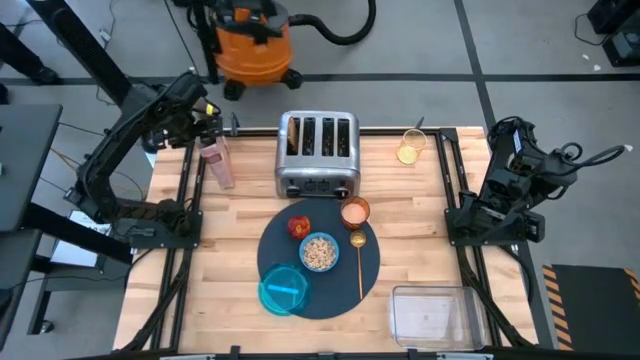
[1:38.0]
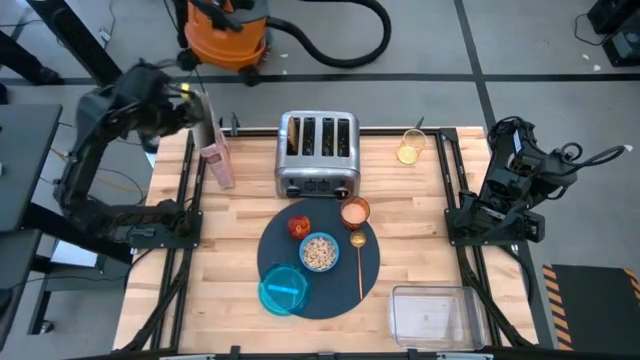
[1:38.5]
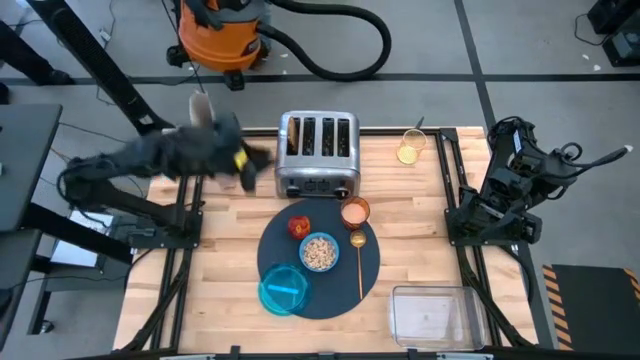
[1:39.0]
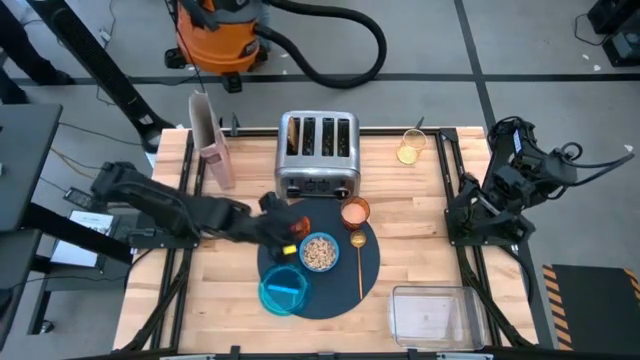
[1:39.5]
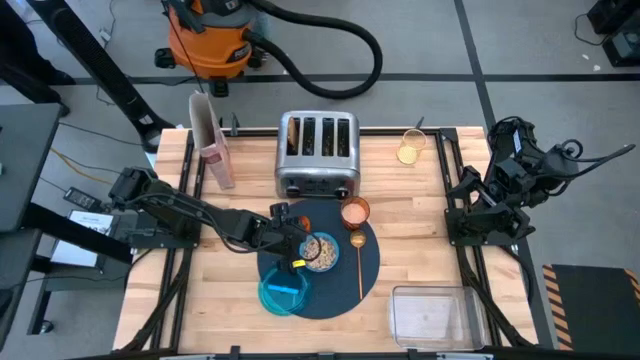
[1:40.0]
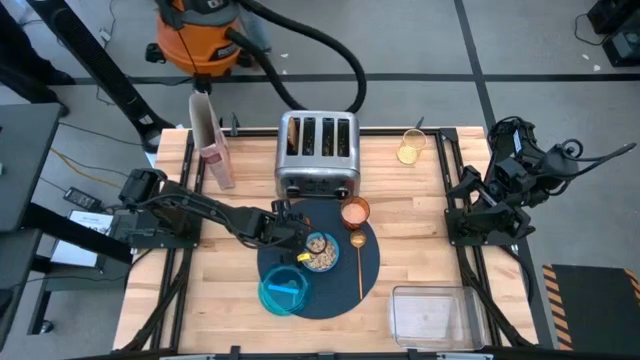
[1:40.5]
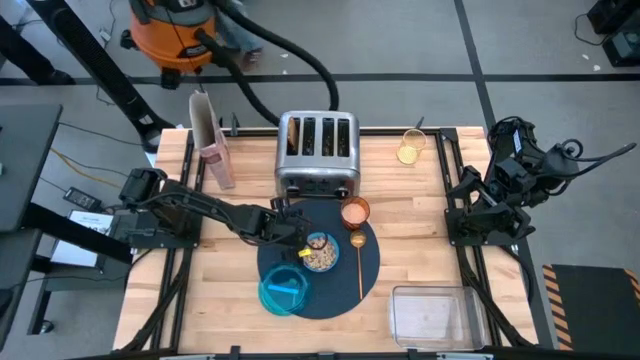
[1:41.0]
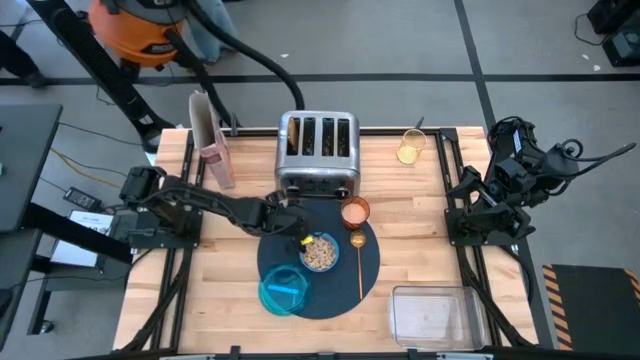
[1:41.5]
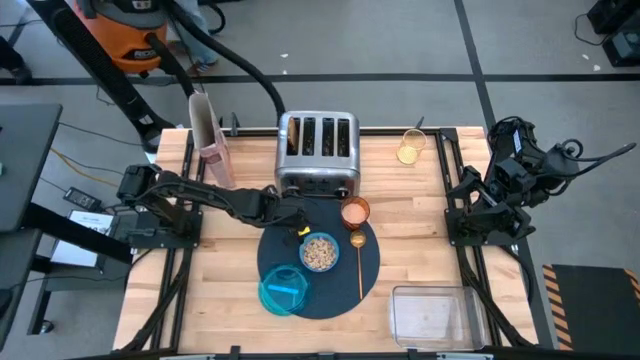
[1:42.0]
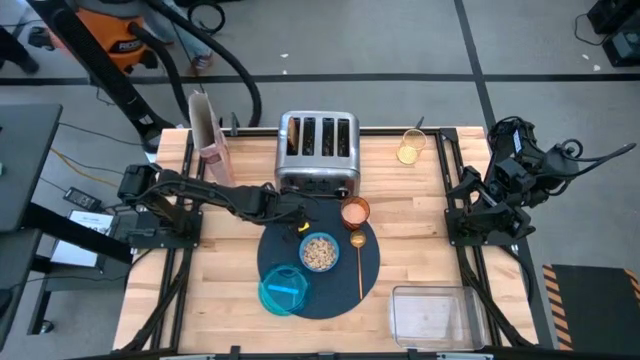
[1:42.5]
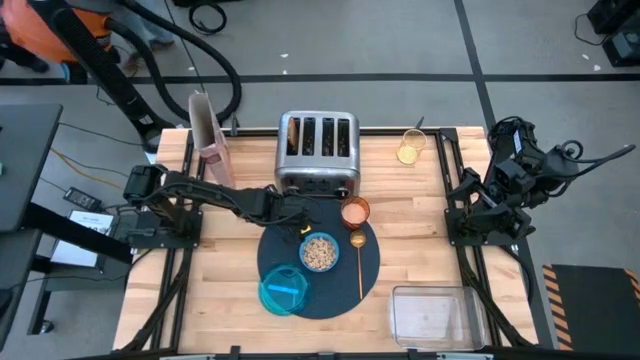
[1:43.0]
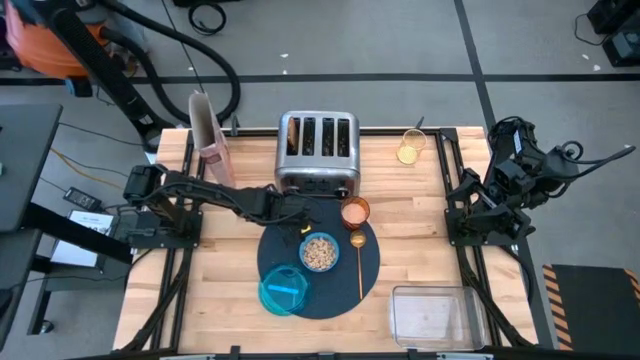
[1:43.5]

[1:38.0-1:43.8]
Task: Arrange a breakfast setting
Adjust the red apple

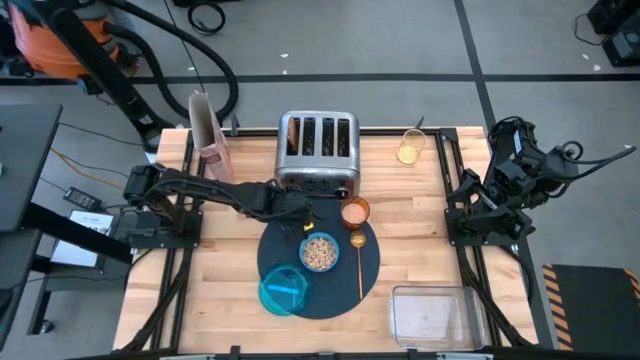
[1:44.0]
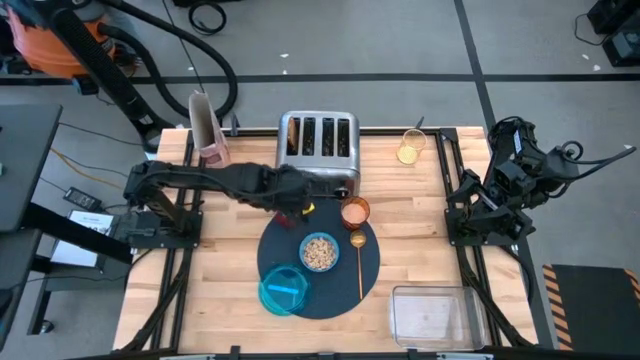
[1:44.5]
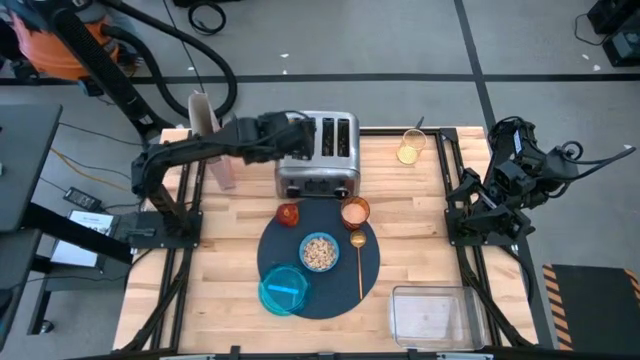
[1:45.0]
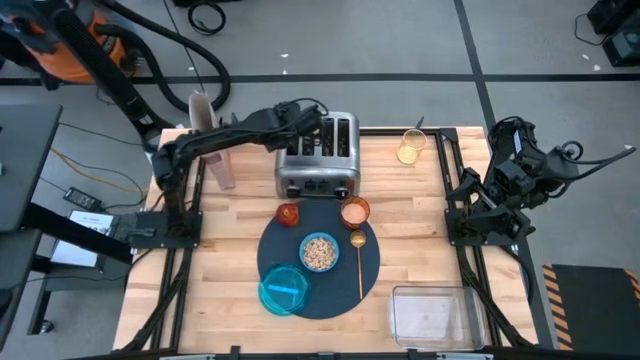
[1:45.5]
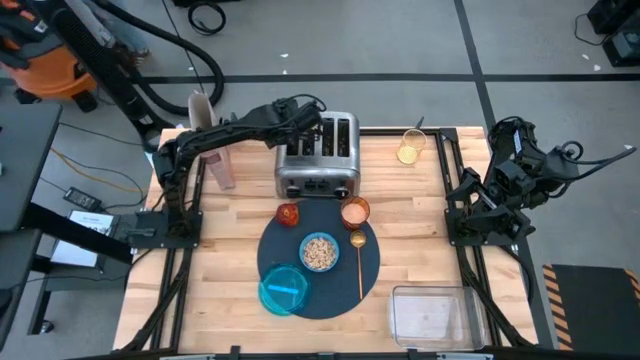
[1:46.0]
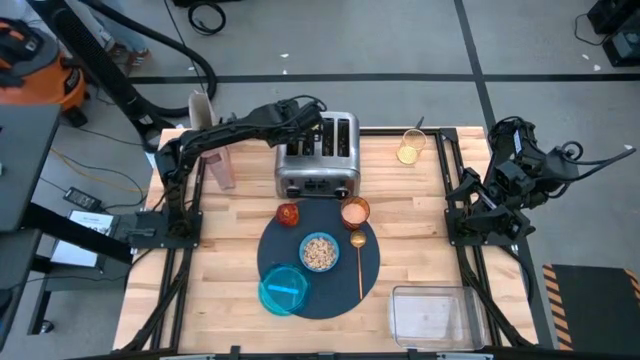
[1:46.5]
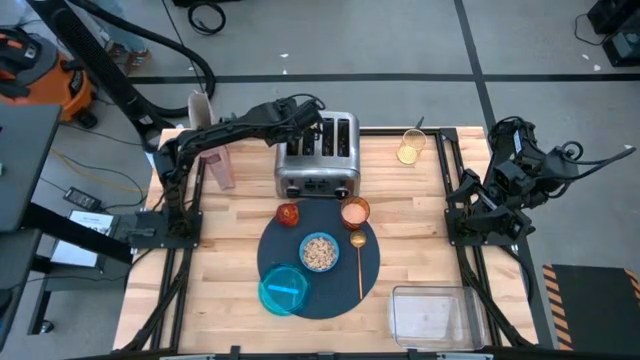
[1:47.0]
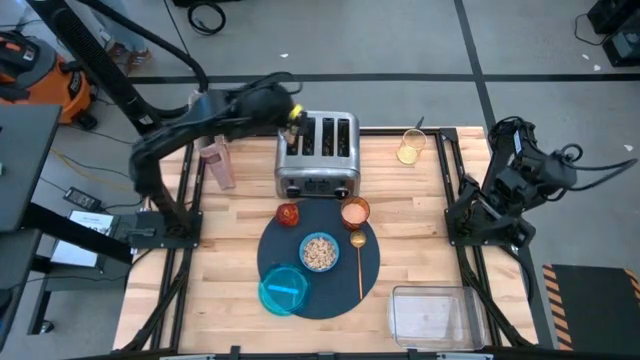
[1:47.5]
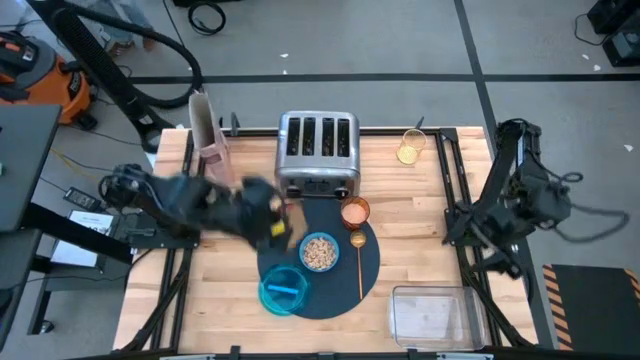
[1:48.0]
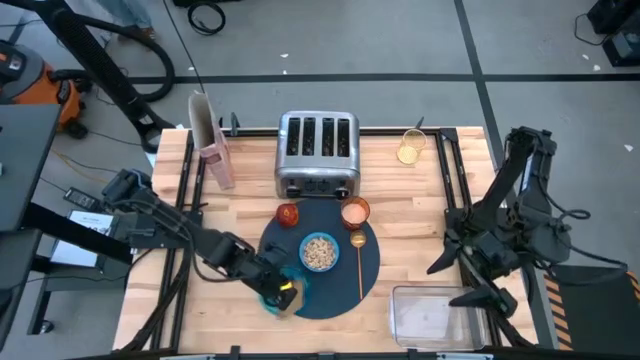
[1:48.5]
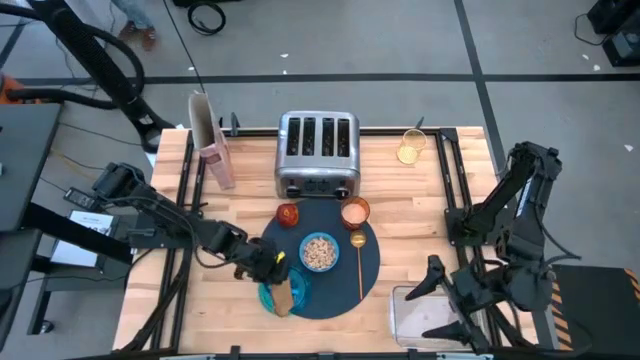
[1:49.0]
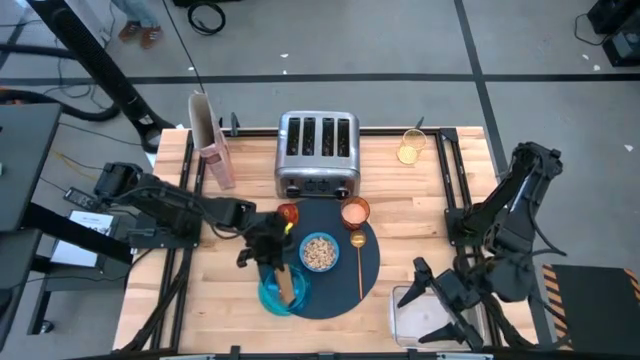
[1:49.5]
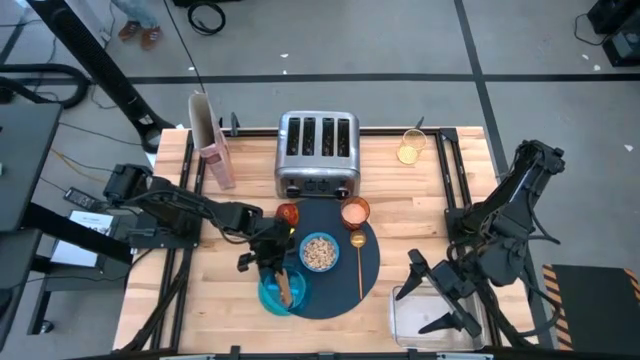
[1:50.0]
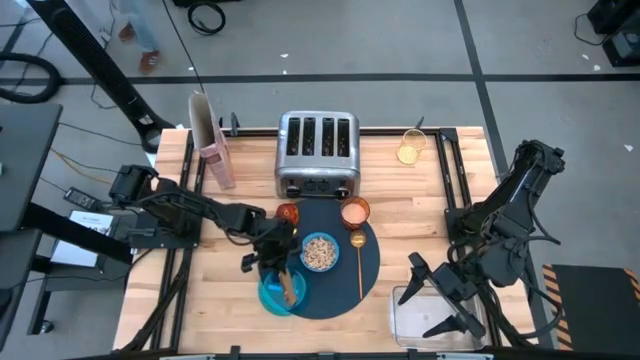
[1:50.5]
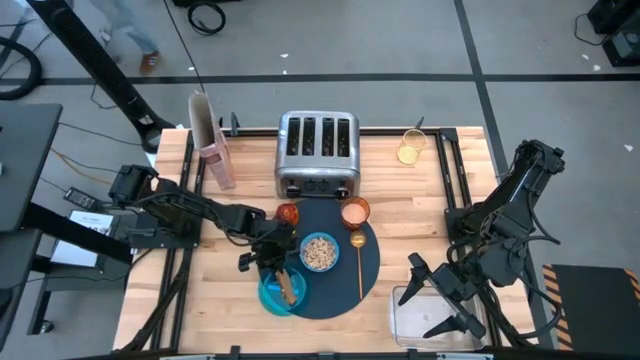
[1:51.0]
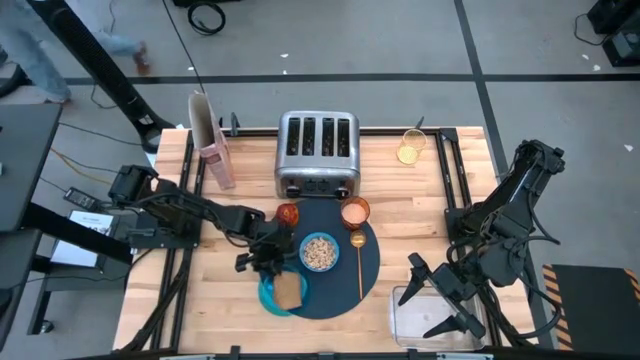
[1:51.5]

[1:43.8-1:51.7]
Put the toasted bread on the blue plate

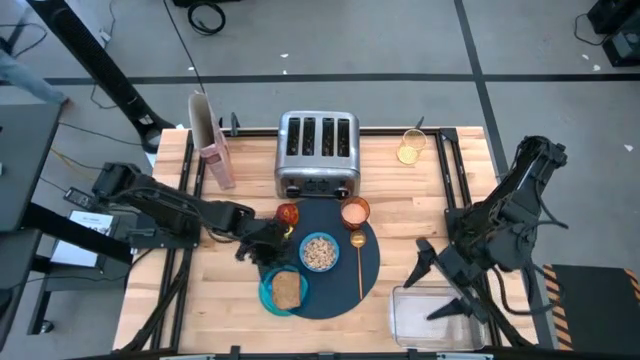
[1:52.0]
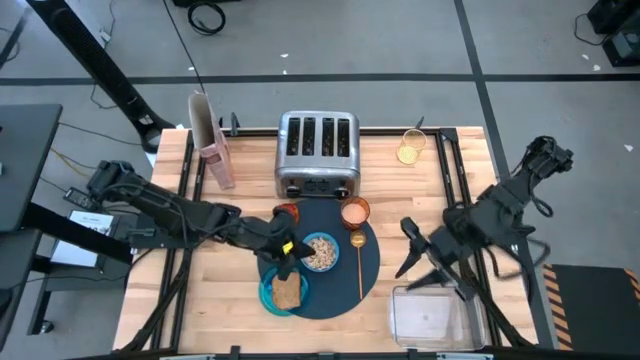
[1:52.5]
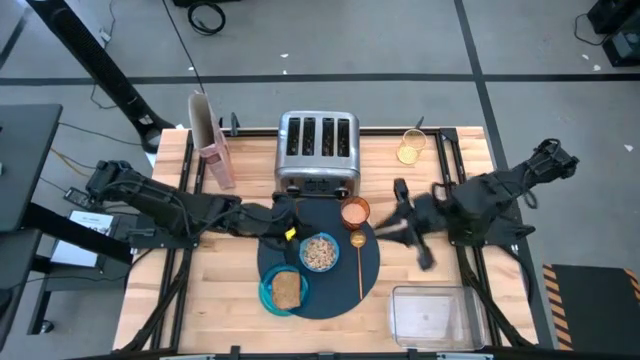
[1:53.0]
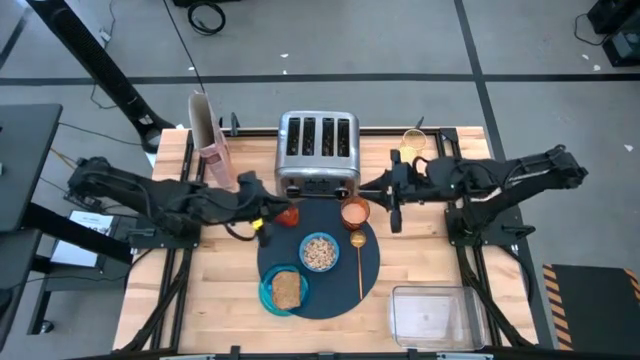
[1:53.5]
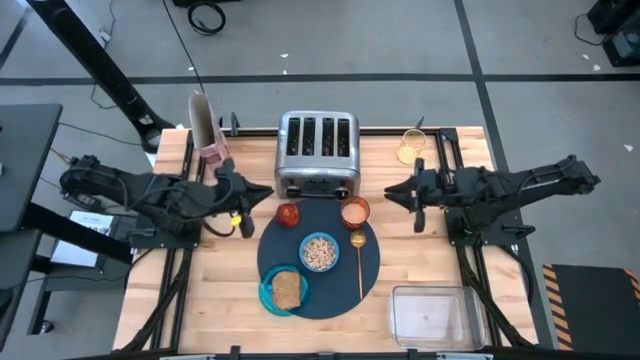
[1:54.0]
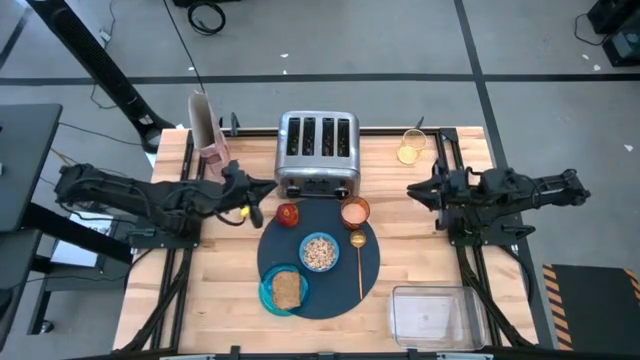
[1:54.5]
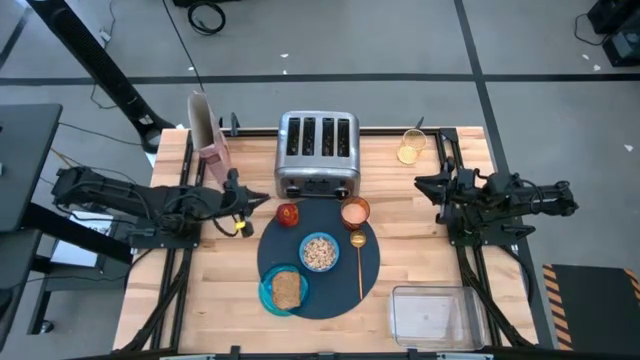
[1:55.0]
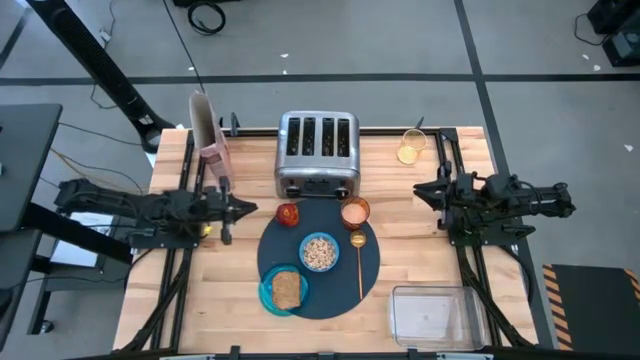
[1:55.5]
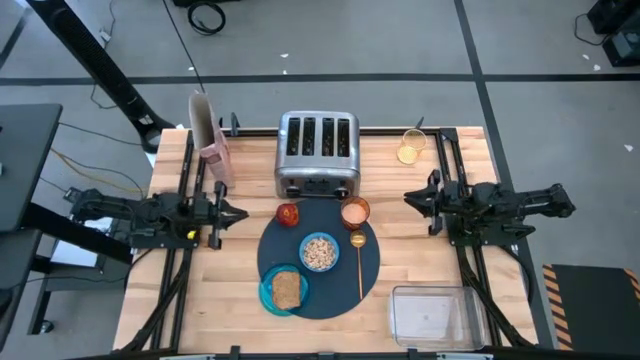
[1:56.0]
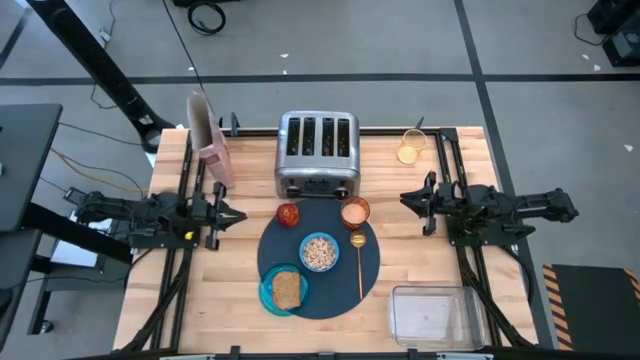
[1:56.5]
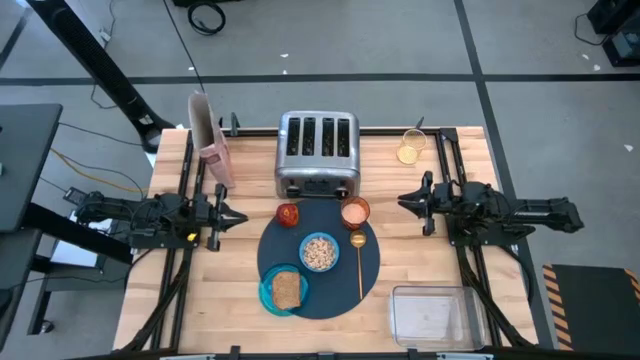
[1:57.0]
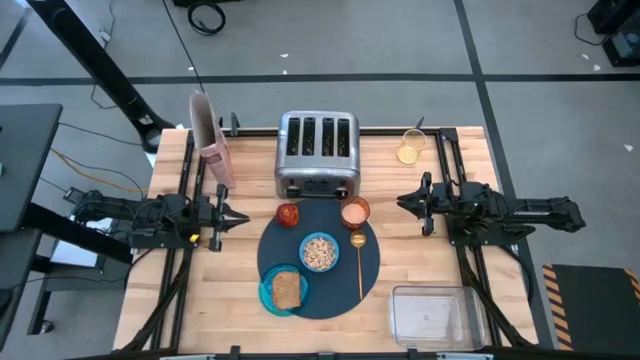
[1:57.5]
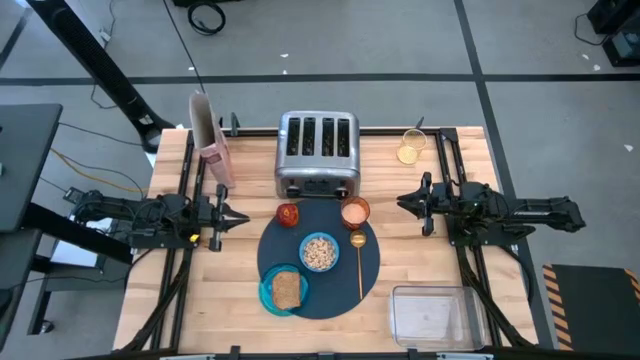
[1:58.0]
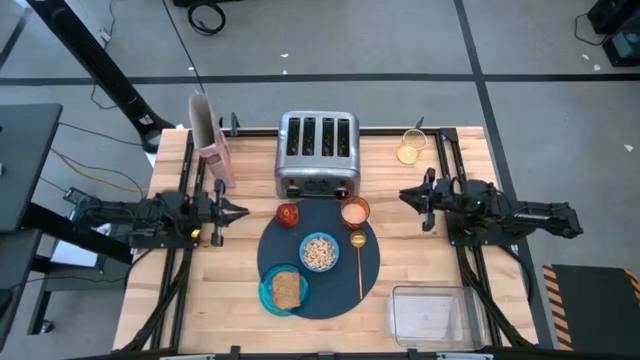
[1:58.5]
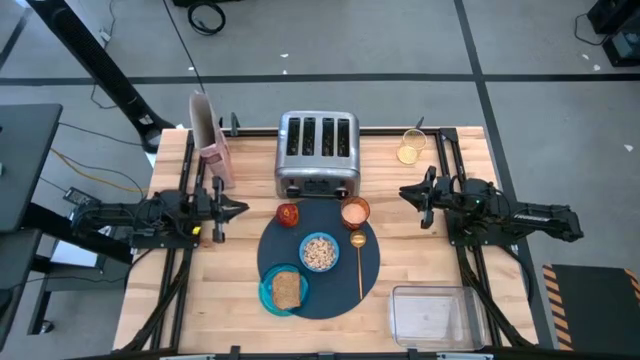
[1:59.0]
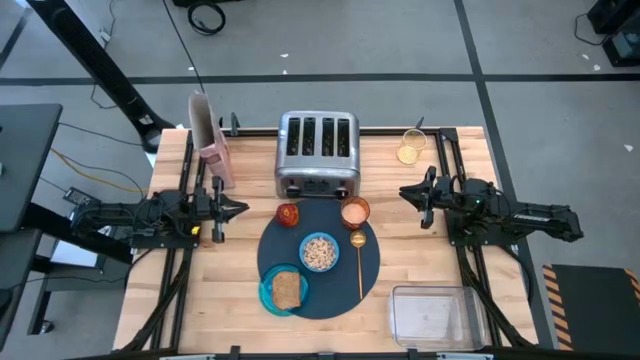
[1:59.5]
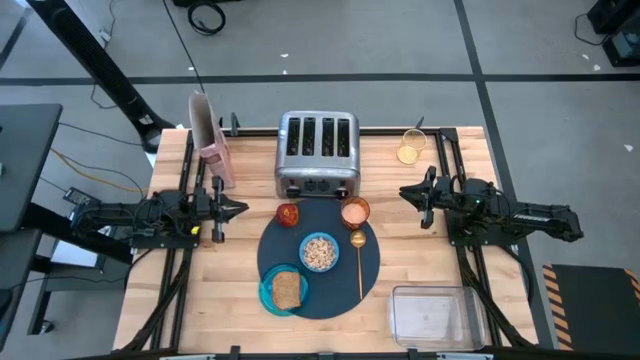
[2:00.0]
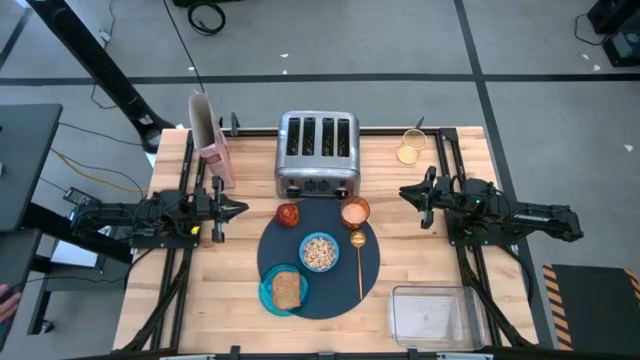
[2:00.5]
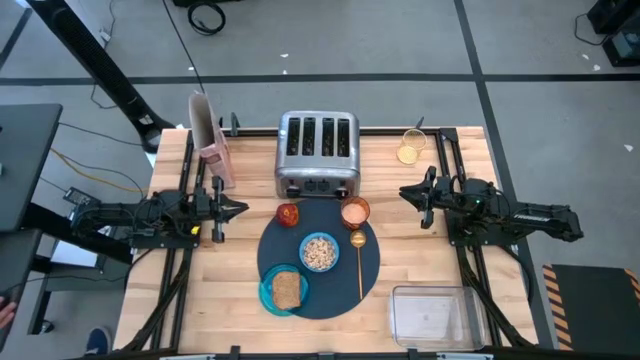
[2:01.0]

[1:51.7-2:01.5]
Return to Home Position
